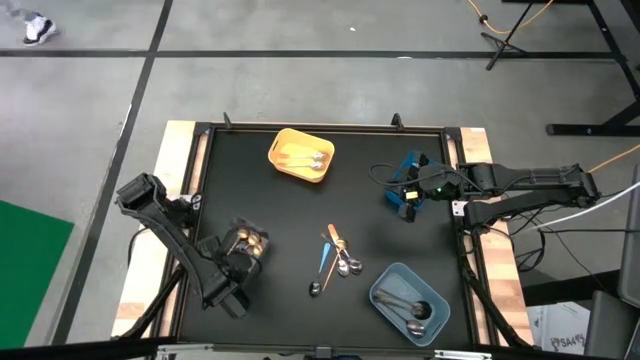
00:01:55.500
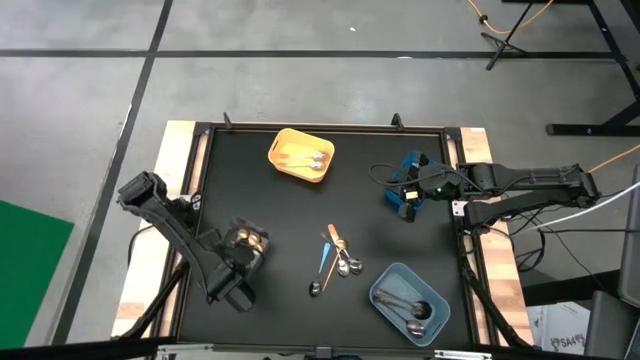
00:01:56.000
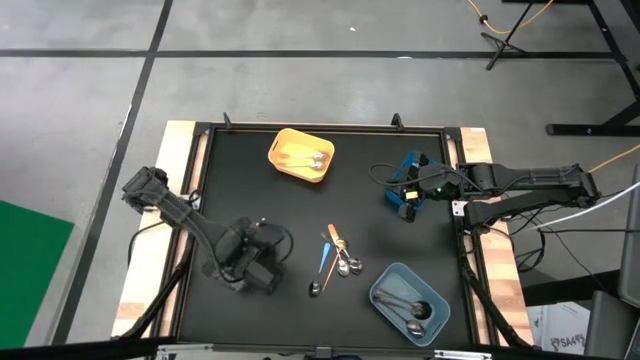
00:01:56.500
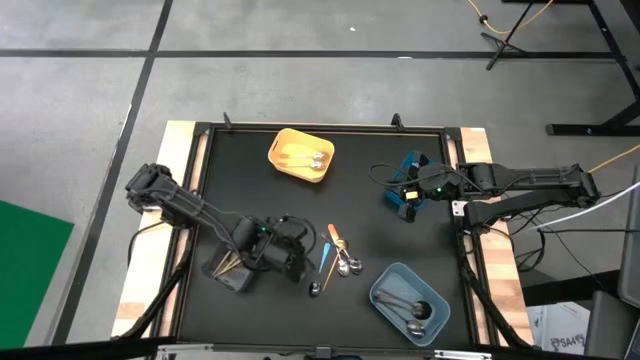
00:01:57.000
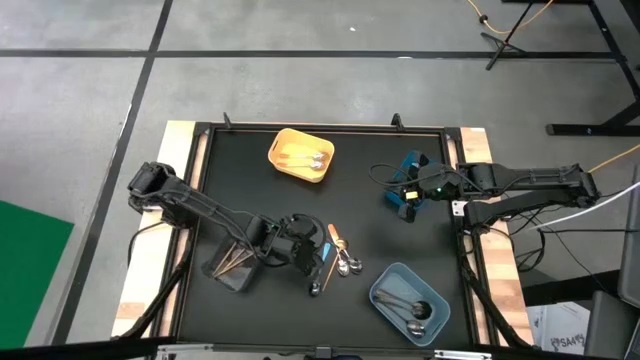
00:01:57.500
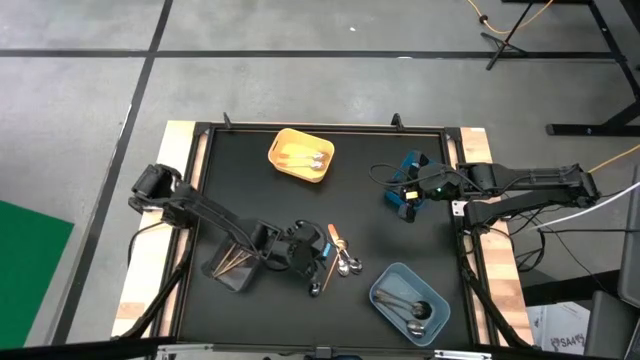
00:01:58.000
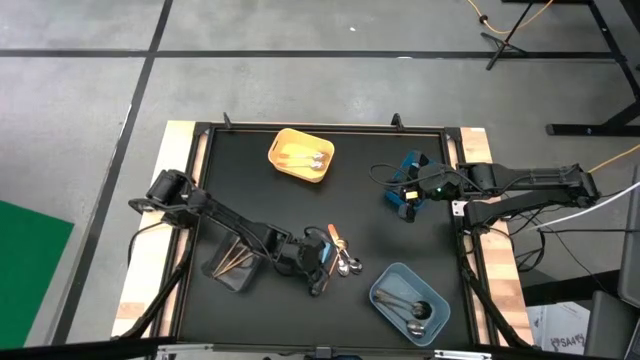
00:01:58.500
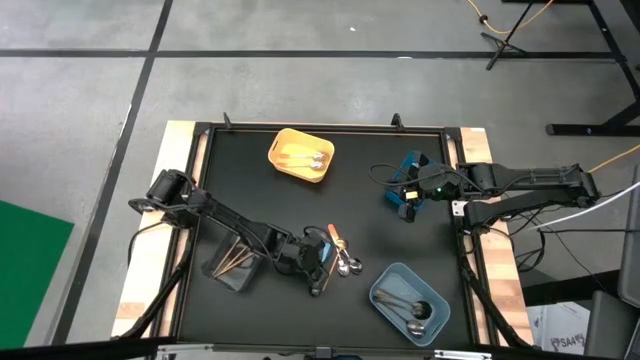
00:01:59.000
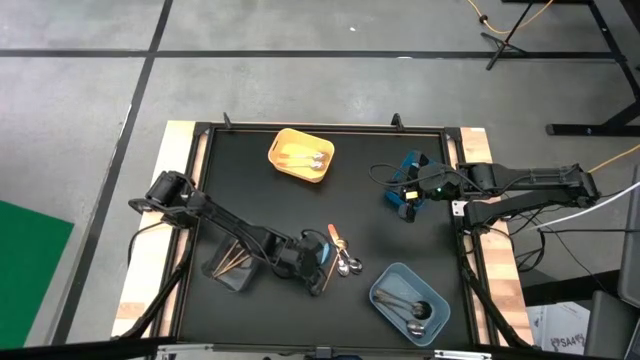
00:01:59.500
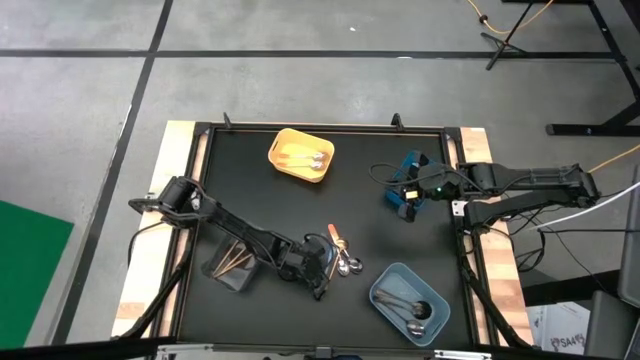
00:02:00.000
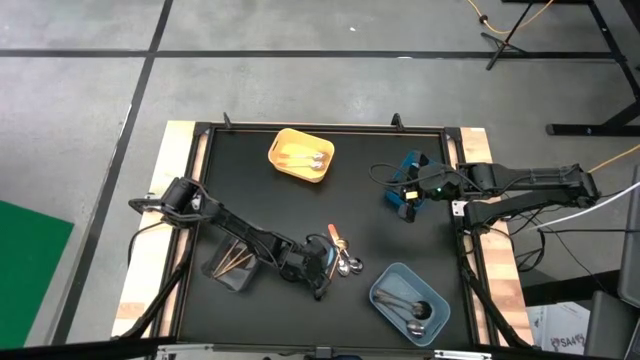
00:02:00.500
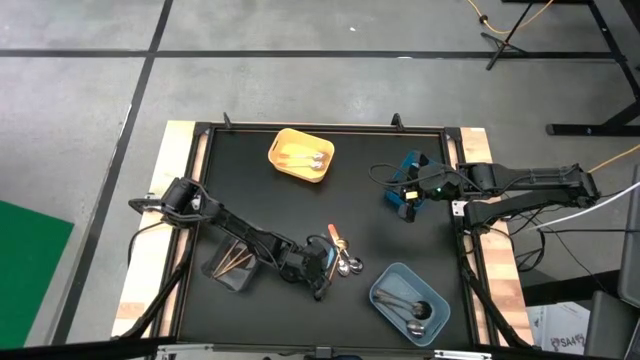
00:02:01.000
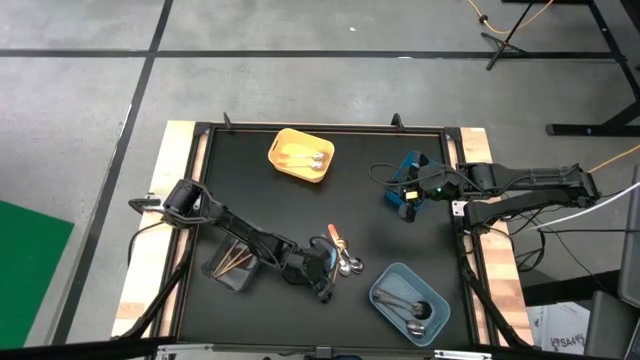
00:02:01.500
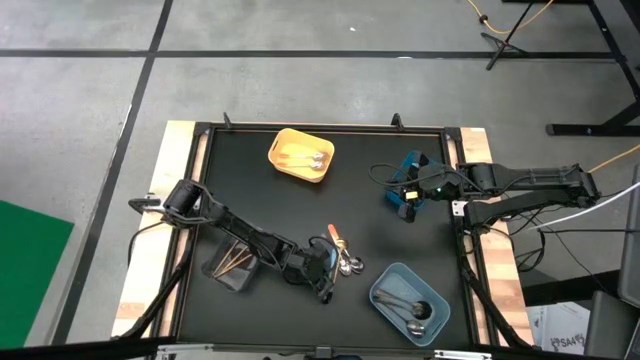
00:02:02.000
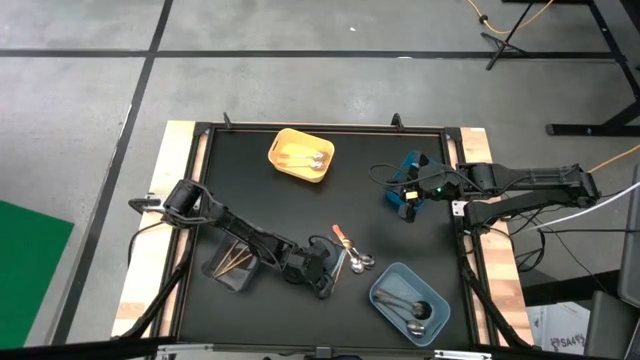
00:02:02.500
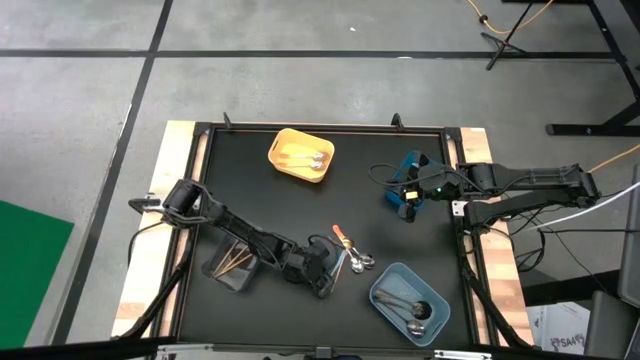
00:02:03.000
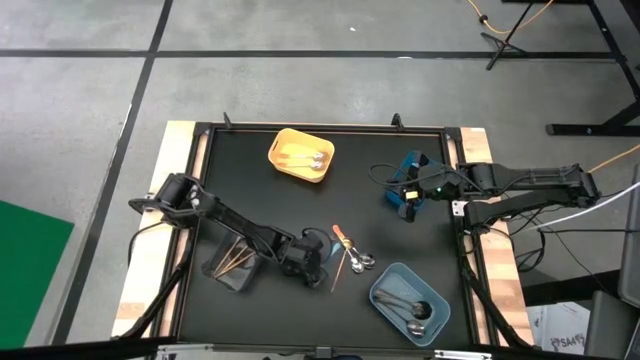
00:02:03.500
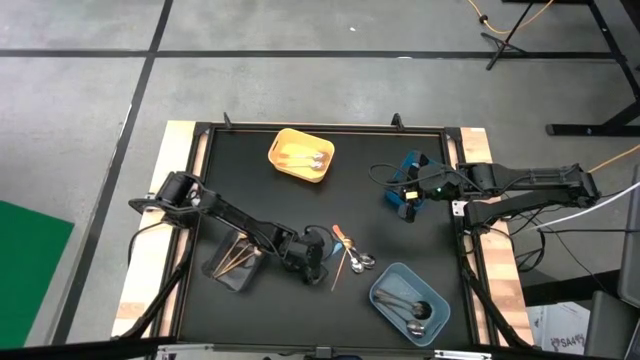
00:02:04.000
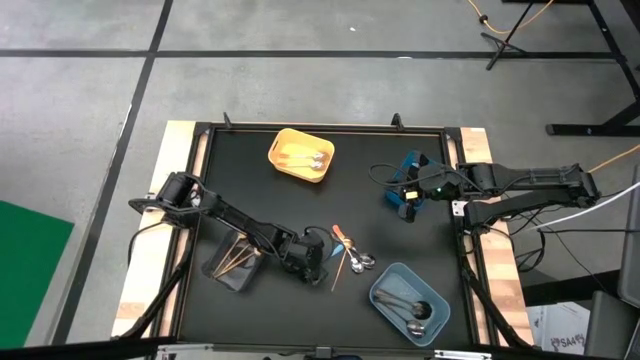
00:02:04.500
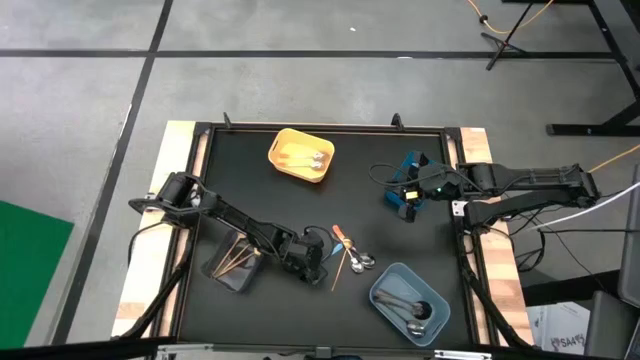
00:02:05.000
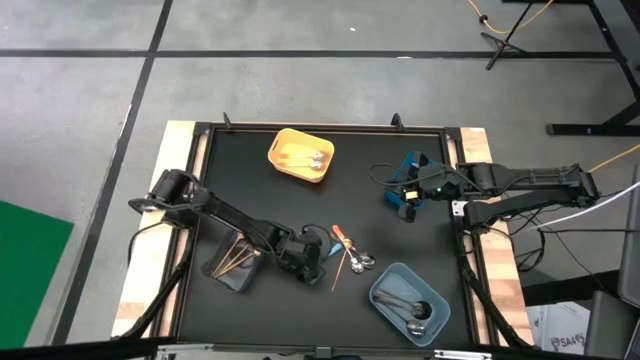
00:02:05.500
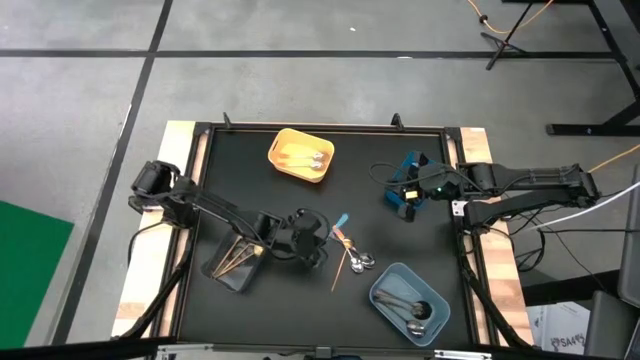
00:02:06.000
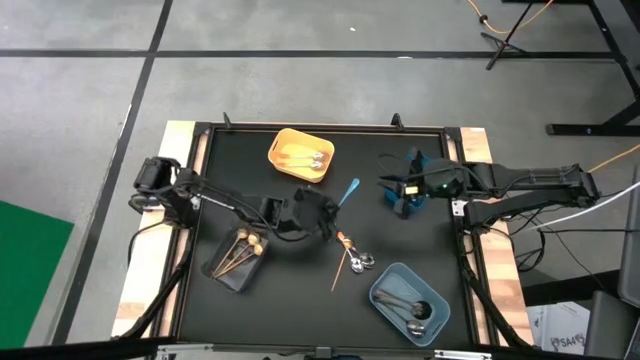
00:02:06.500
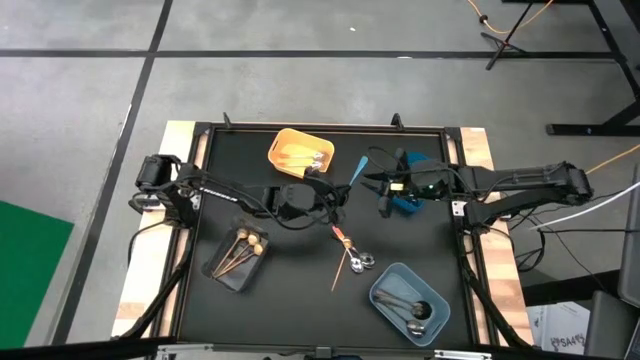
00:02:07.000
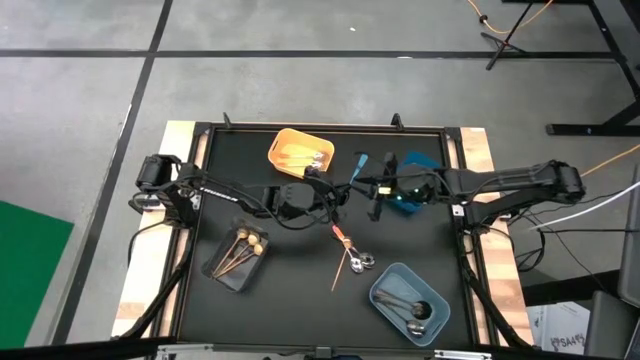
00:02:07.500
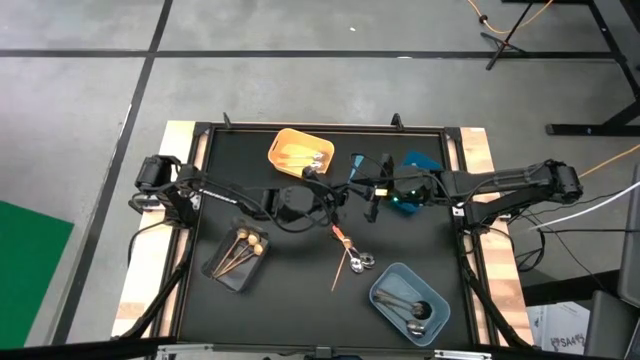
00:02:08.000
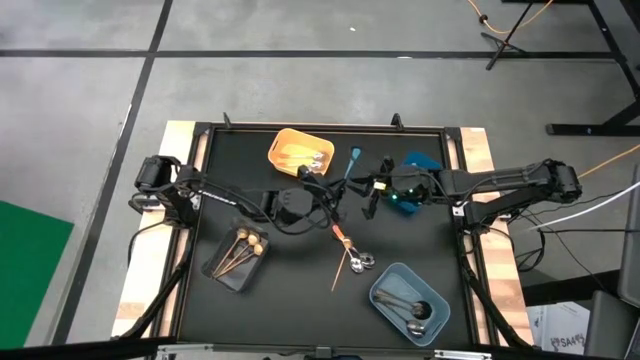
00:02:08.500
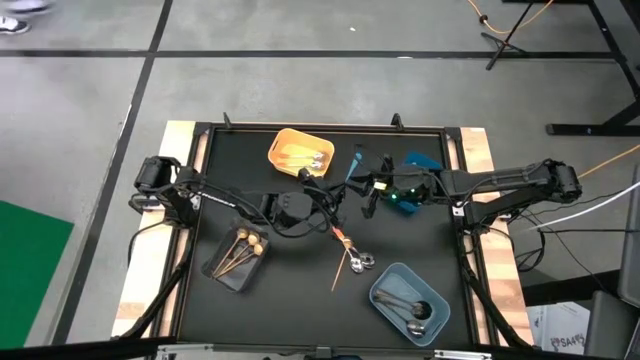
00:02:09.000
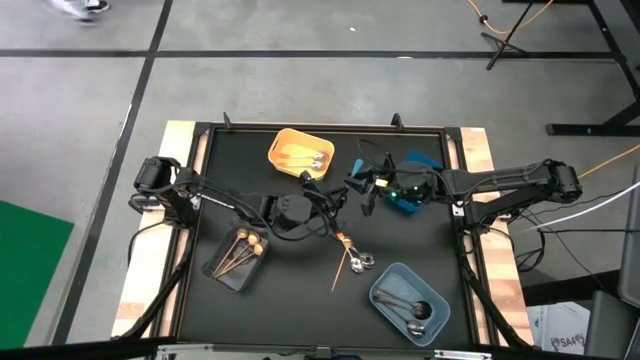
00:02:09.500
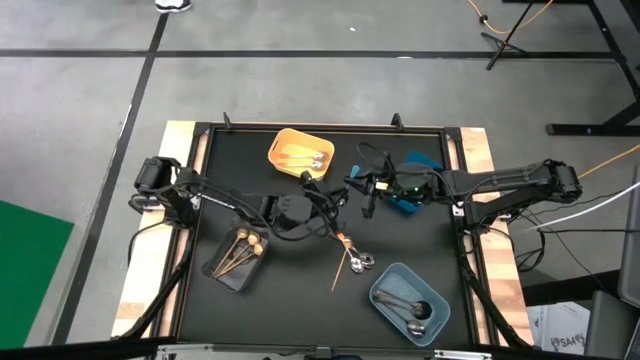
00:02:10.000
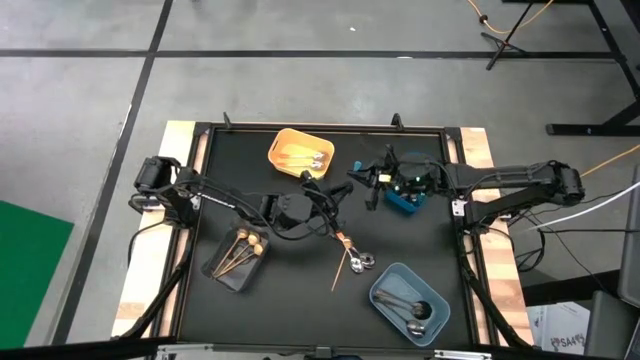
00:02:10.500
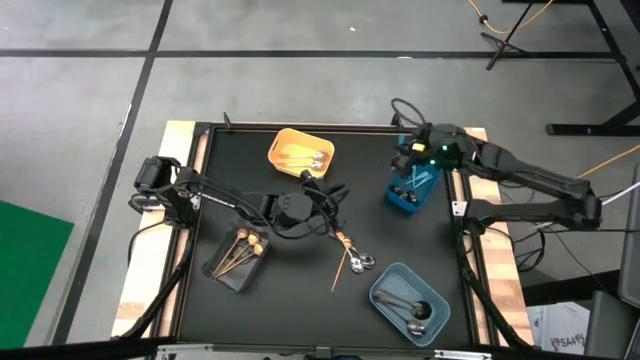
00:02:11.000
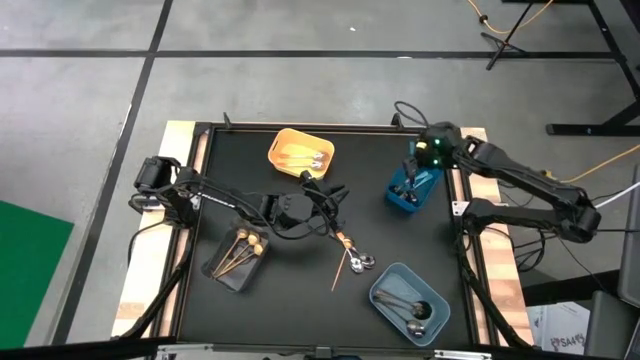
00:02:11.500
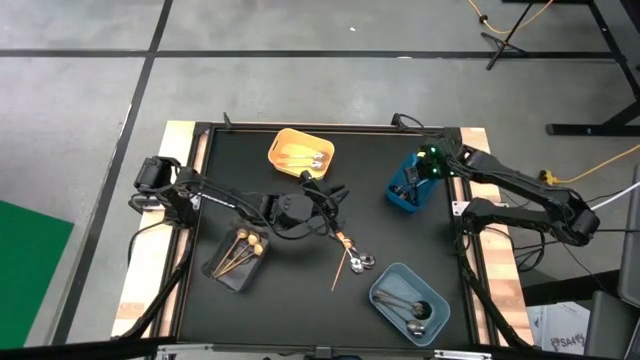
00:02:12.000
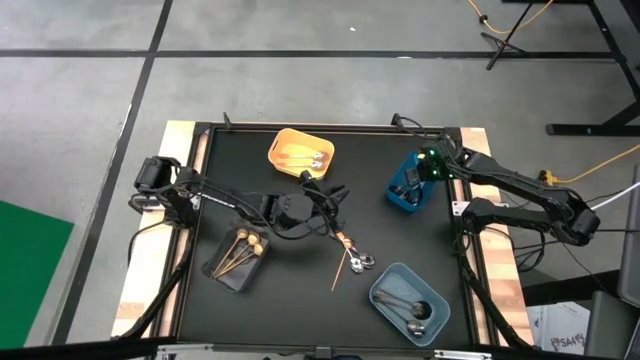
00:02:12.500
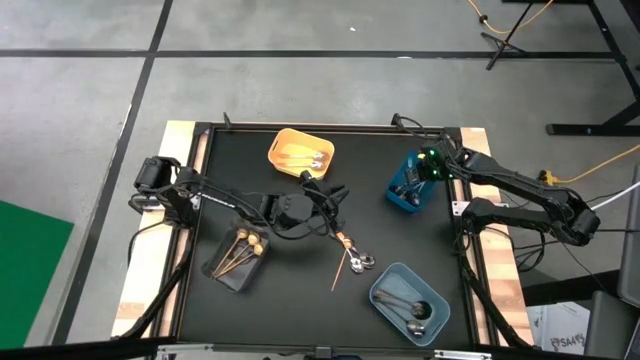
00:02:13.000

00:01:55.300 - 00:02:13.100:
Task: Sort silverware by color (type)
Put the light blue spoon into the blue bin

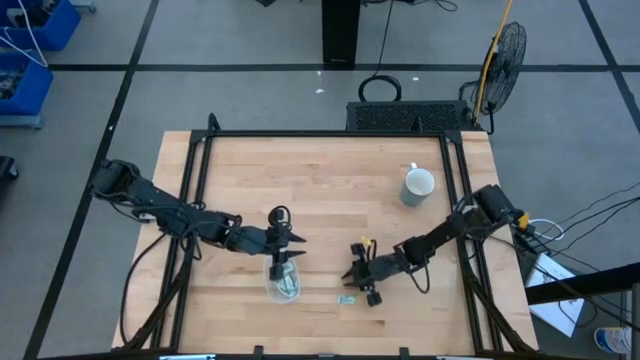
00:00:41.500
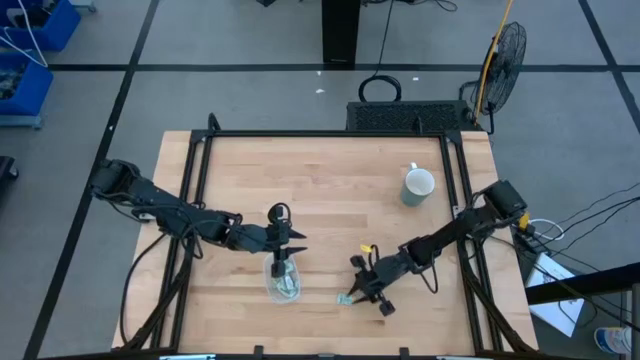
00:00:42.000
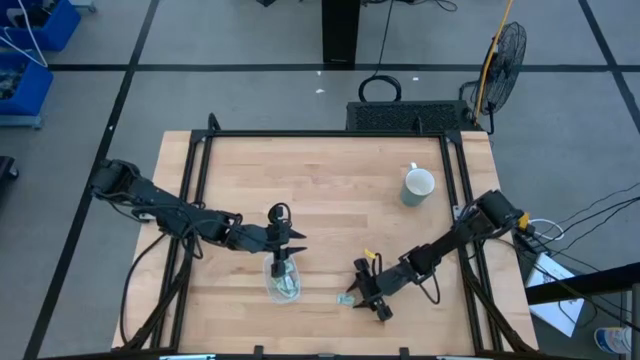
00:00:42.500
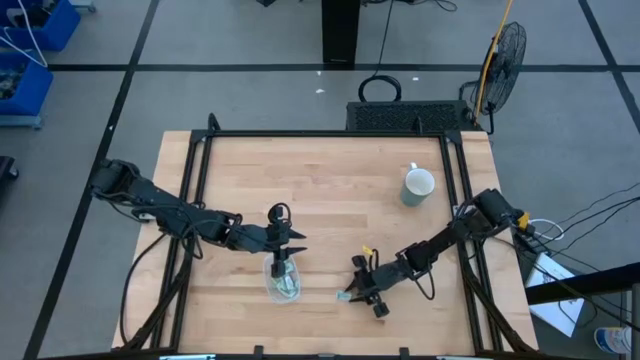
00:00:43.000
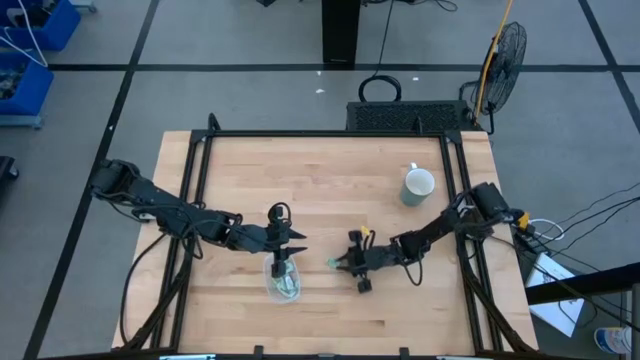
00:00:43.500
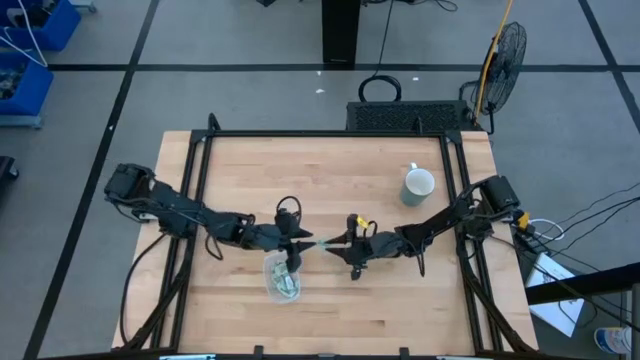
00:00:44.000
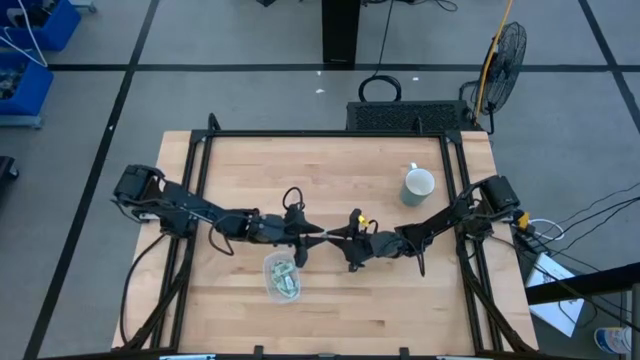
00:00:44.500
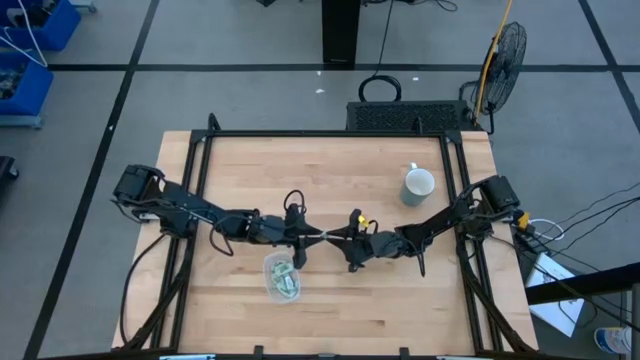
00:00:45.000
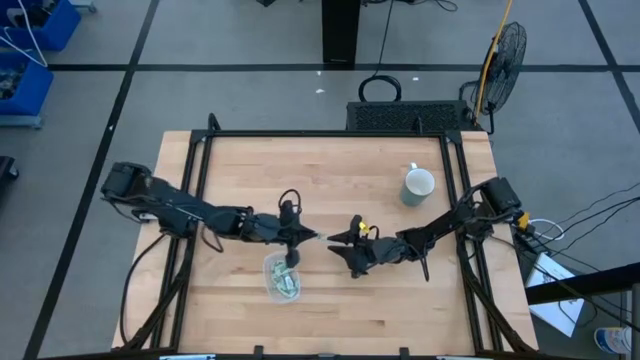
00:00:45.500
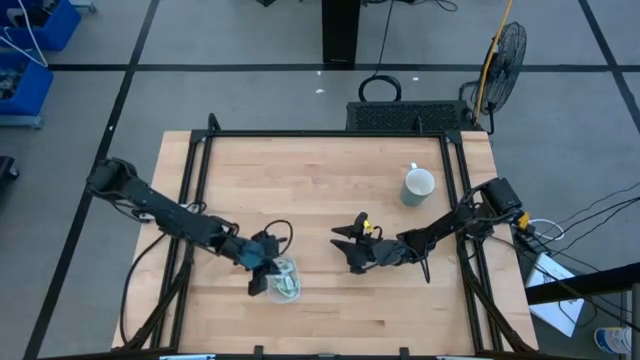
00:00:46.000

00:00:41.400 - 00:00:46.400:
Task: Pick and place Stevia / Truvia into bins
Put the stevia packet into the transparent container
